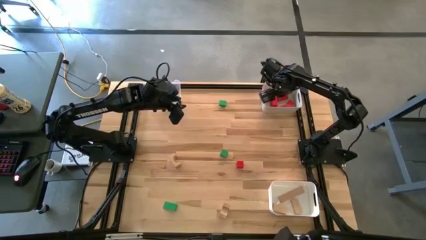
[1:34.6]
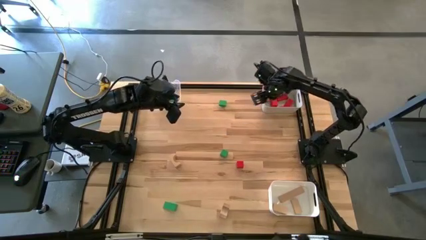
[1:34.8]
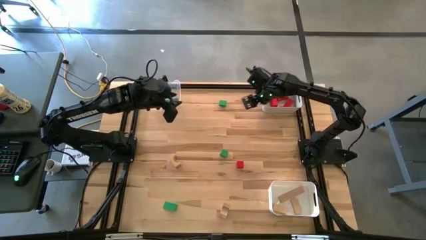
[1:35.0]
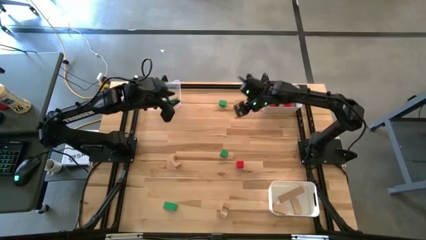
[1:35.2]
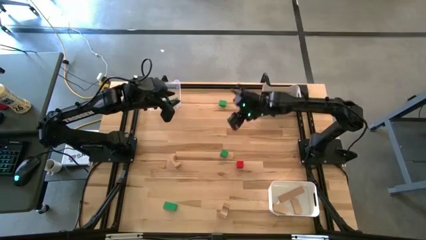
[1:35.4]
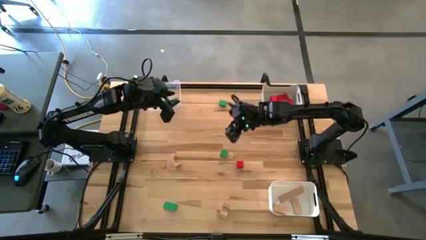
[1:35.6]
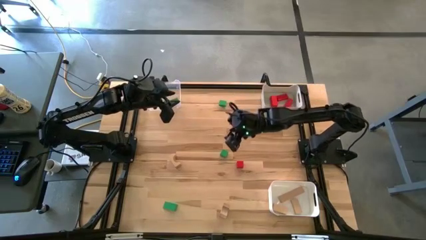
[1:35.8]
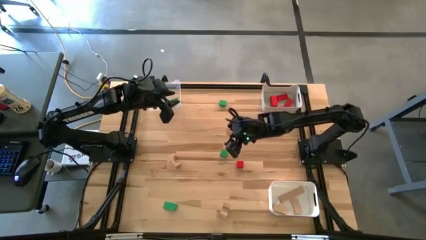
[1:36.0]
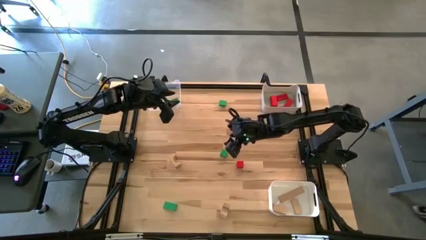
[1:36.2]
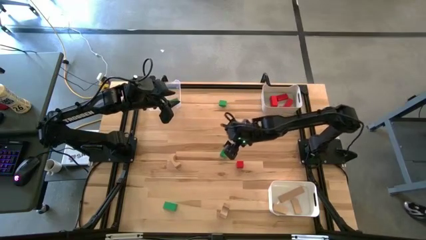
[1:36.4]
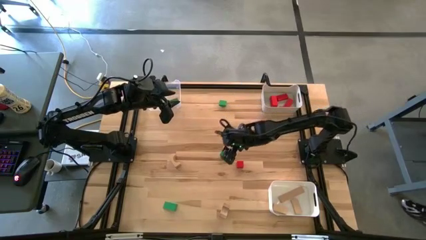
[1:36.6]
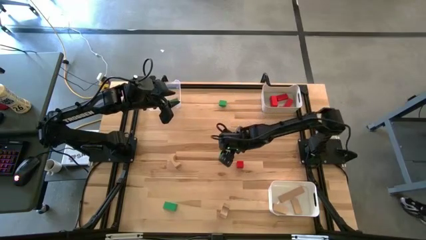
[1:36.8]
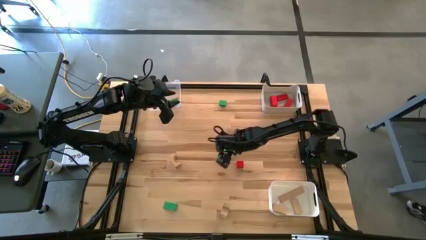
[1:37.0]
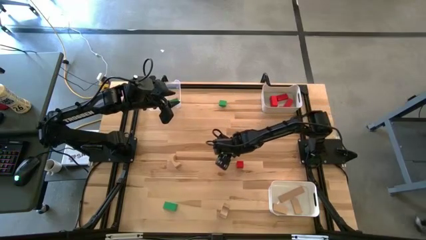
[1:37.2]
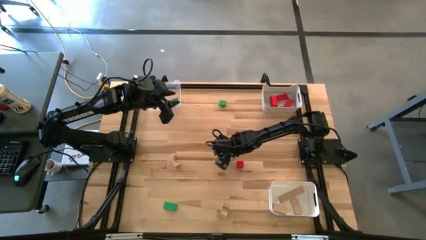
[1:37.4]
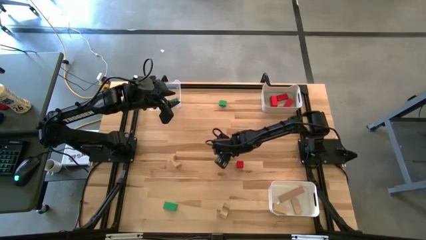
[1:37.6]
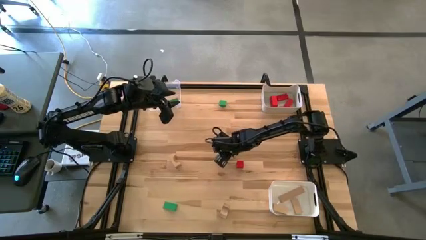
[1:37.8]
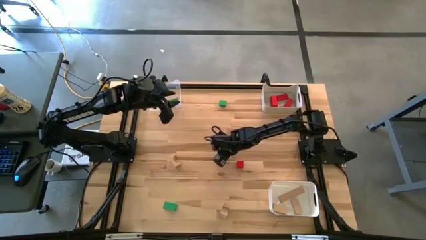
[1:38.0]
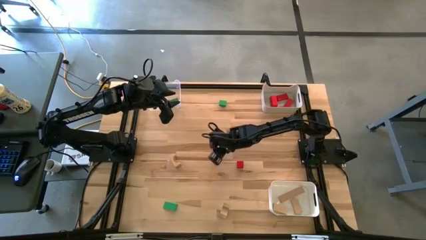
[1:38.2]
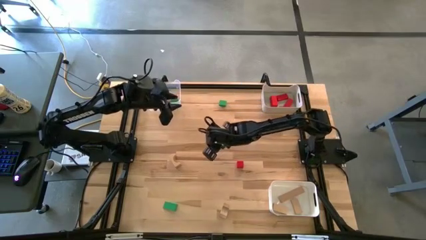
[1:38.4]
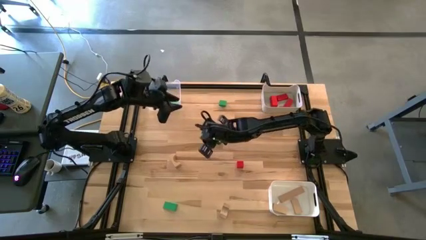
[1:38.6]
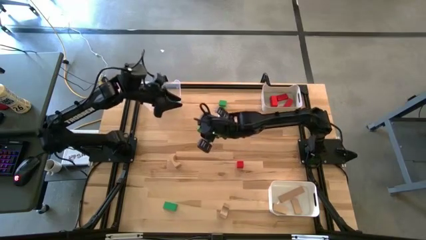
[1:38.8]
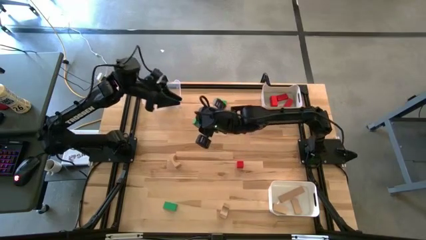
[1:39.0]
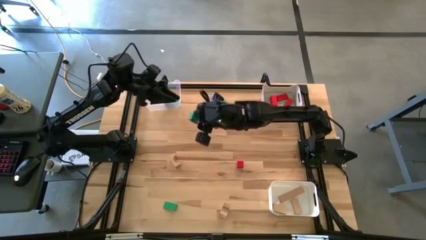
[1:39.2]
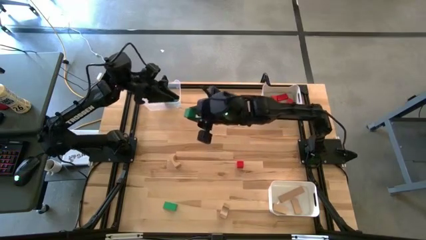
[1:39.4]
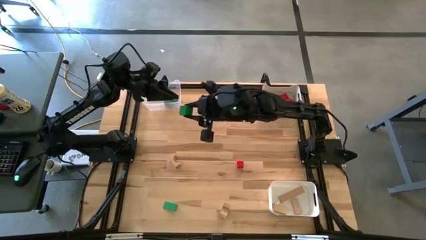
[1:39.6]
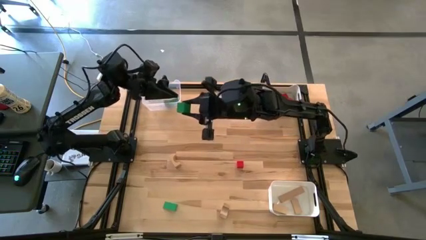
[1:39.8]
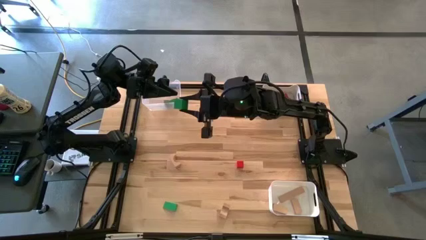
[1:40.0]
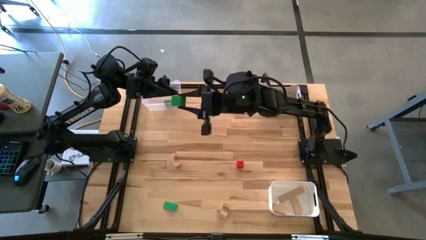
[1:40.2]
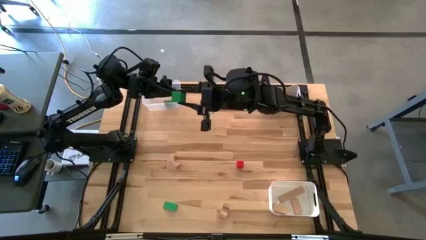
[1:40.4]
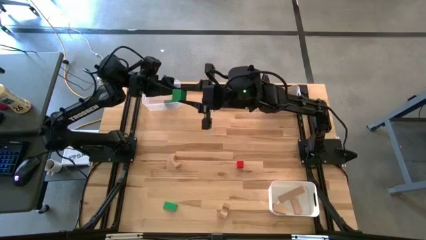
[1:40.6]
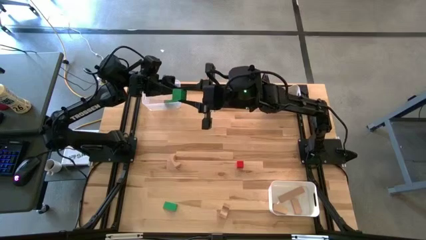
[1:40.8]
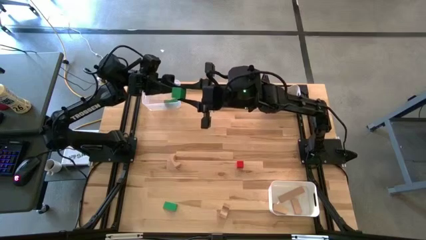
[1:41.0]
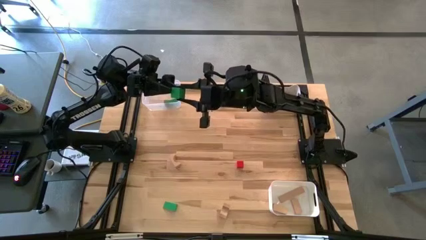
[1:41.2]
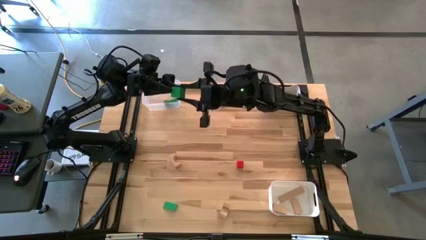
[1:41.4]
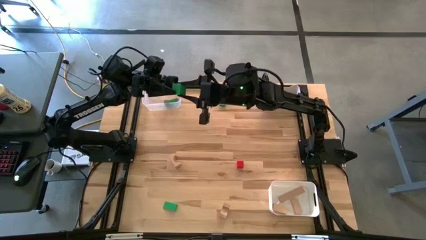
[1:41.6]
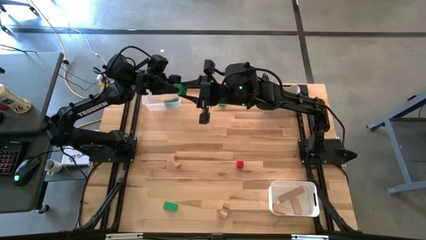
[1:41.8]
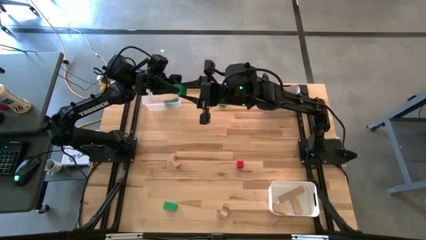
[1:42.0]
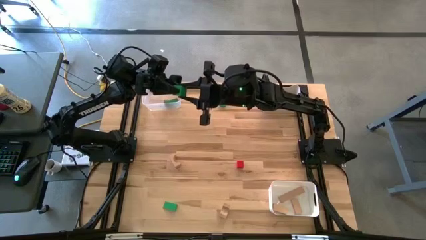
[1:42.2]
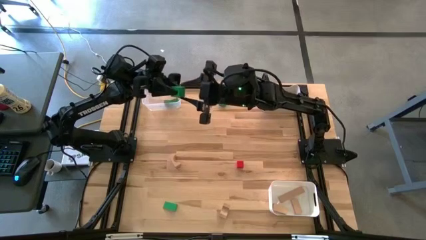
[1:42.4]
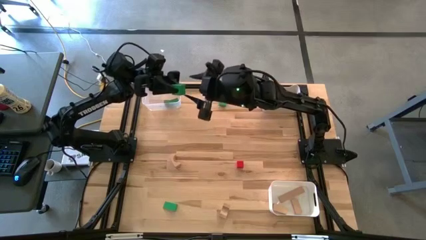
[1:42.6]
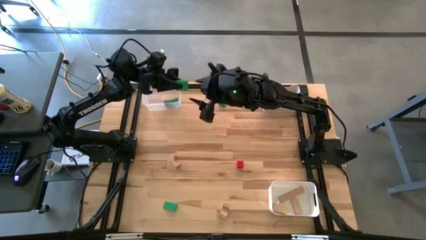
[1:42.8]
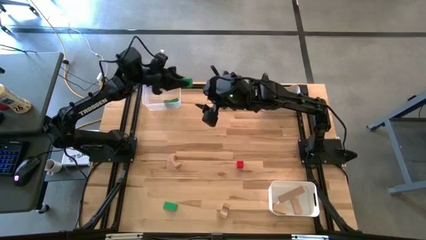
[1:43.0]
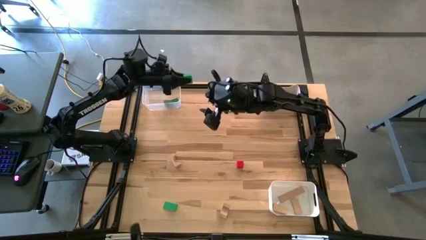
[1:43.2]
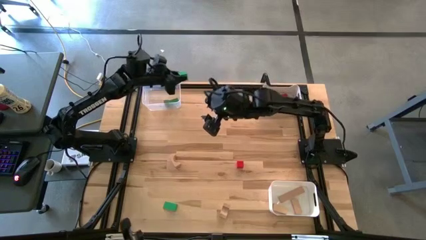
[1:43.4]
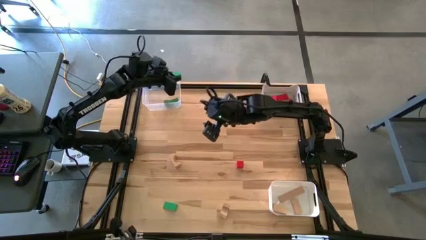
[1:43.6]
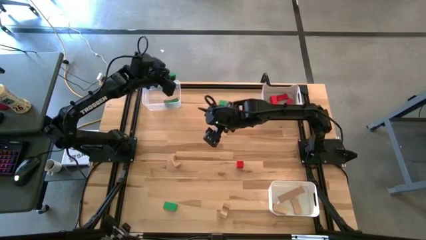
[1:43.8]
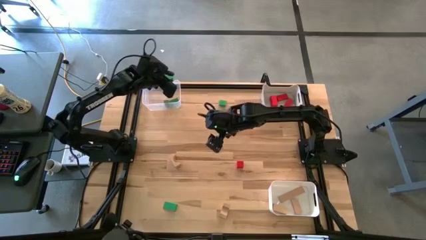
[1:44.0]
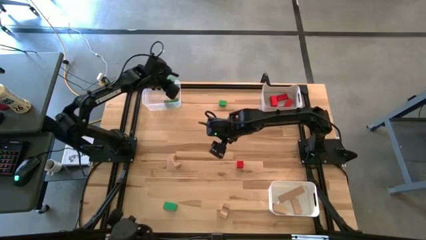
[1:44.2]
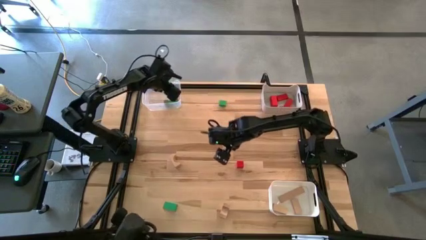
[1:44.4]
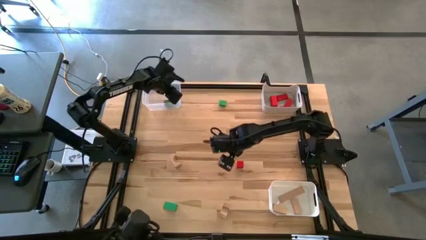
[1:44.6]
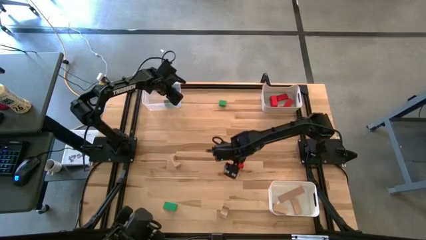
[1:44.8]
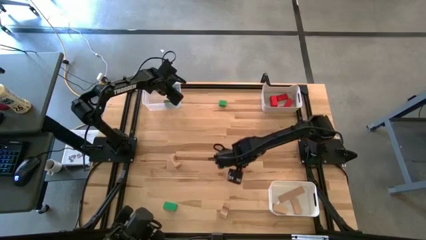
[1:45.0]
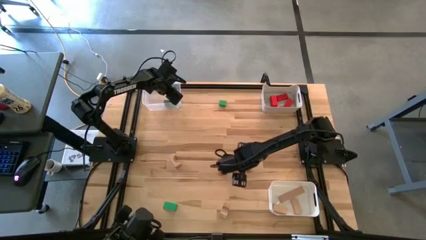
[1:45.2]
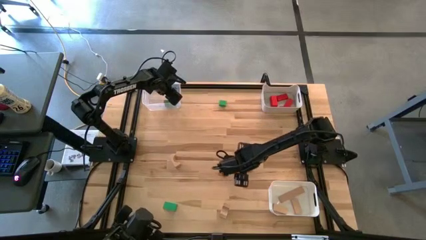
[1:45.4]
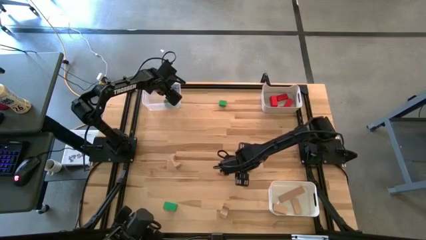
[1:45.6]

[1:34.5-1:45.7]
Task: Sort & place blocks by color
Put the green block into the transparent bin

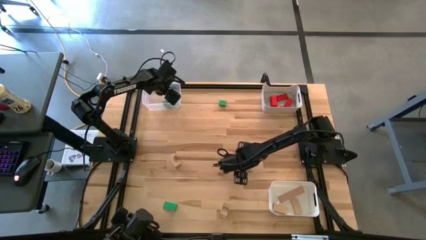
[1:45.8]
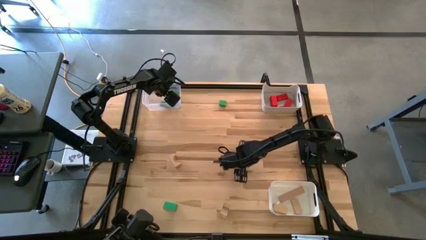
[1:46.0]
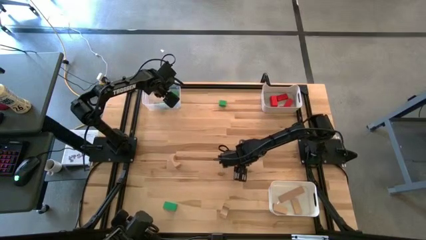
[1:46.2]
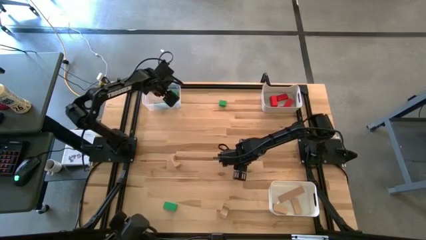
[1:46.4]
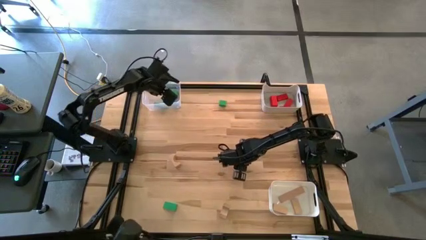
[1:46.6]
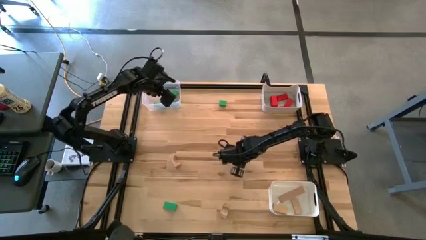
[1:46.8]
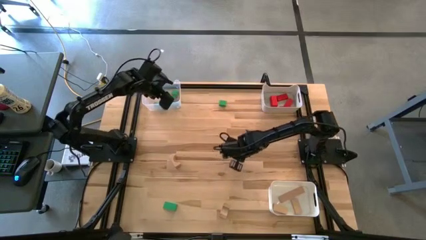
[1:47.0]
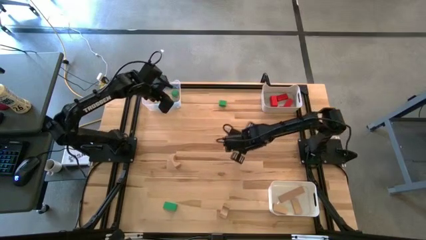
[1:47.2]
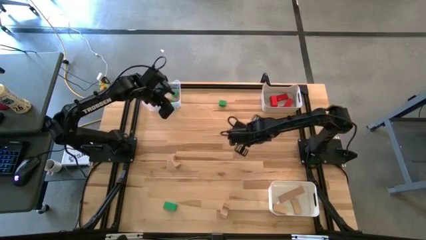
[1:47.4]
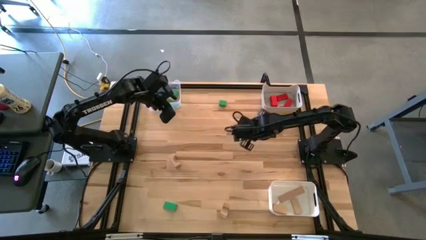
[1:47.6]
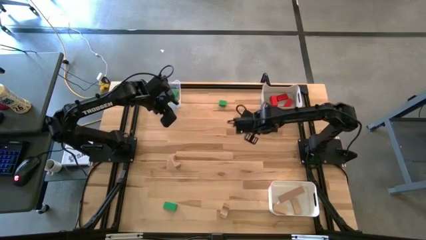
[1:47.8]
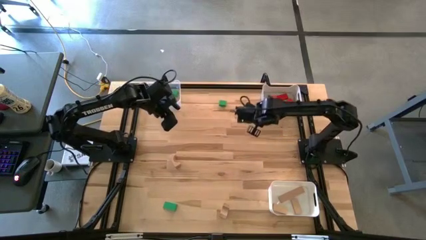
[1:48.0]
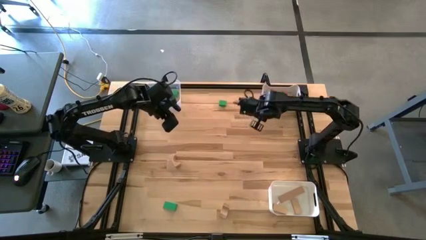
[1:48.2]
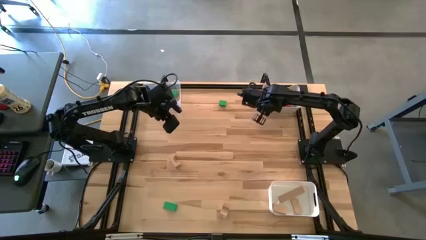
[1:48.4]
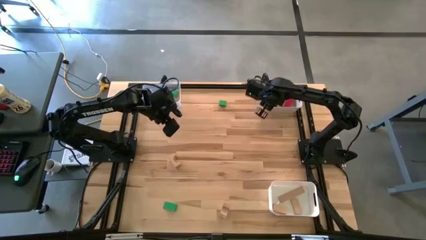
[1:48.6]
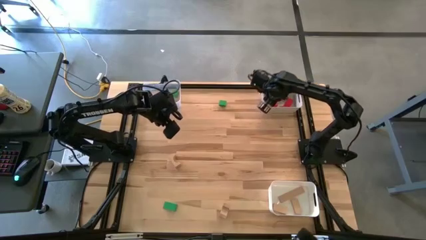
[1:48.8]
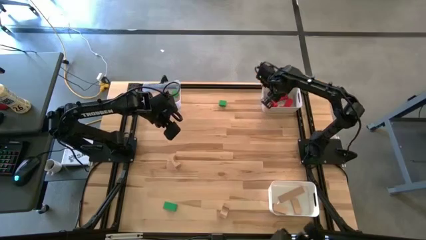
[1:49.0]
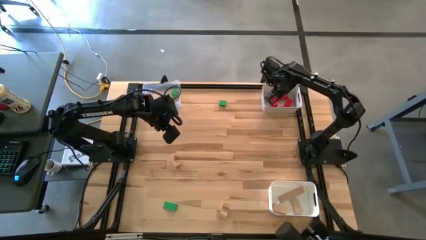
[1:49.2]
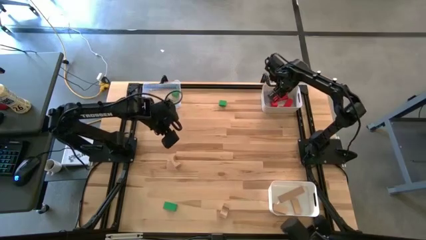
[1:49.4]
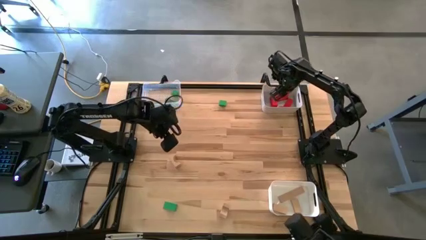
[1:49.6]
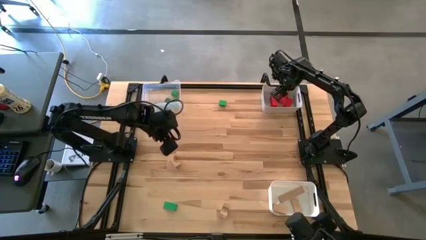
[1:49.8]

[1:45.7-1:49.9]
Put the red block into the gray bin
